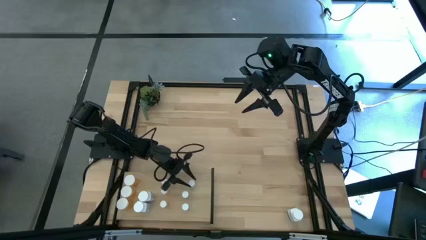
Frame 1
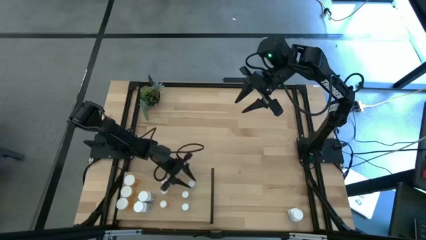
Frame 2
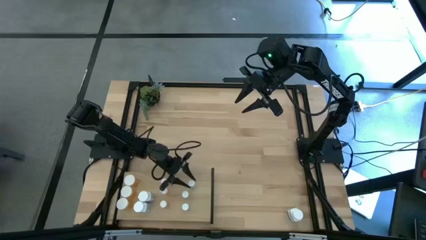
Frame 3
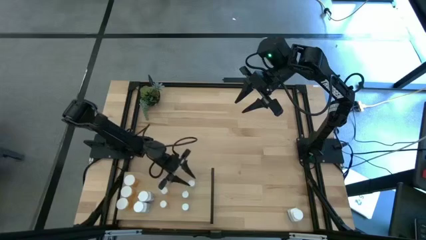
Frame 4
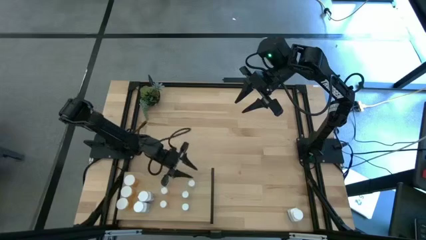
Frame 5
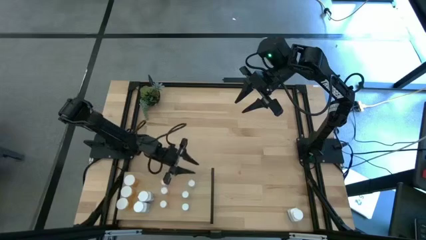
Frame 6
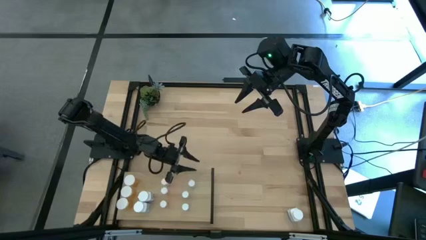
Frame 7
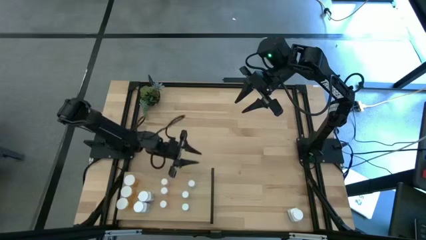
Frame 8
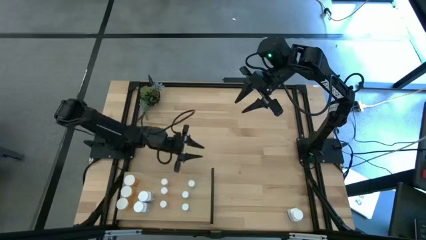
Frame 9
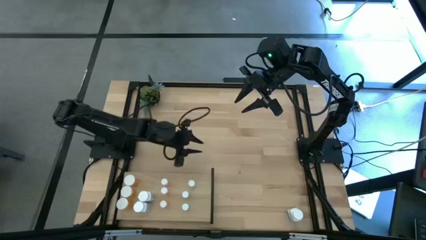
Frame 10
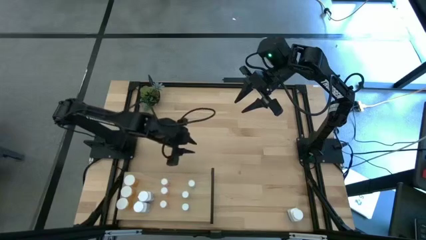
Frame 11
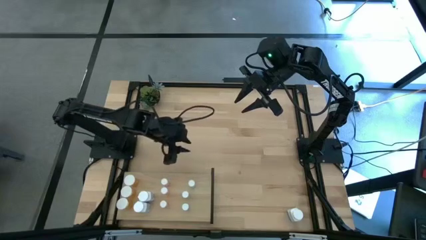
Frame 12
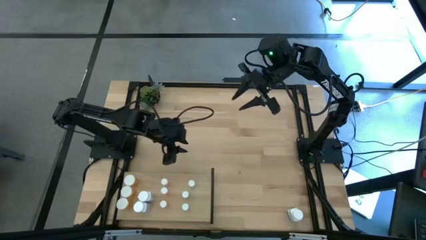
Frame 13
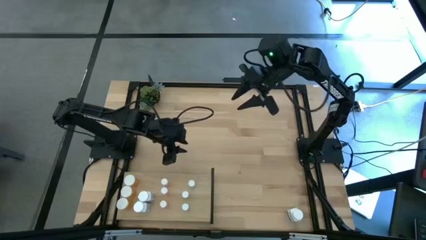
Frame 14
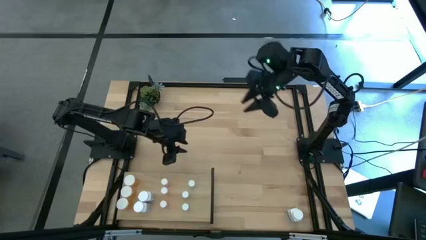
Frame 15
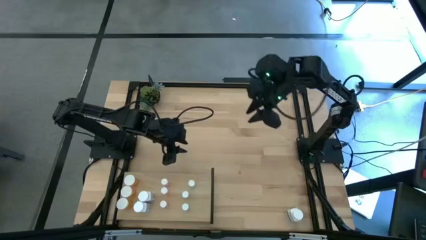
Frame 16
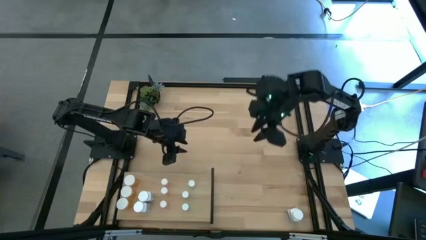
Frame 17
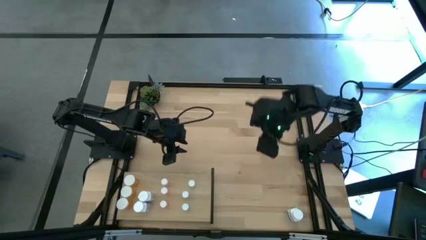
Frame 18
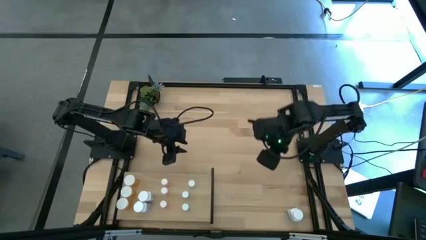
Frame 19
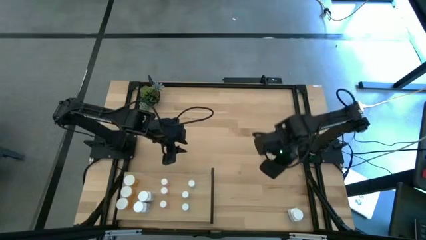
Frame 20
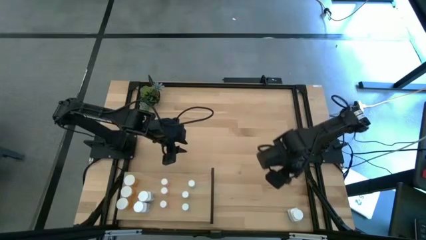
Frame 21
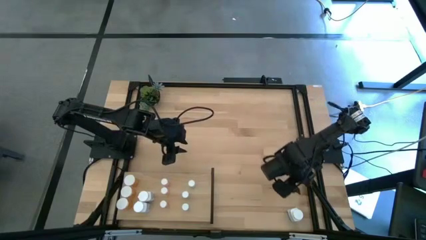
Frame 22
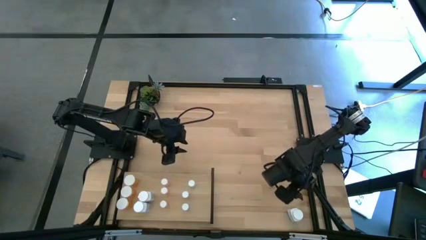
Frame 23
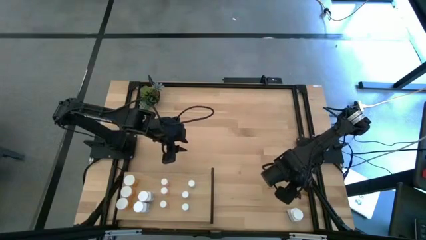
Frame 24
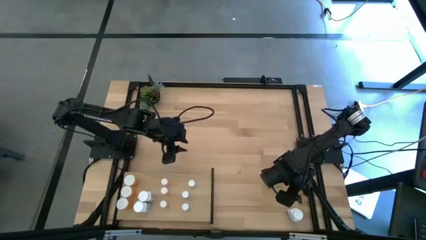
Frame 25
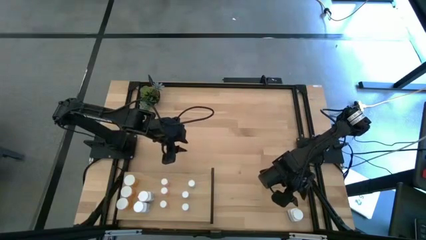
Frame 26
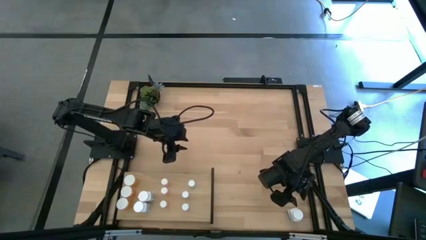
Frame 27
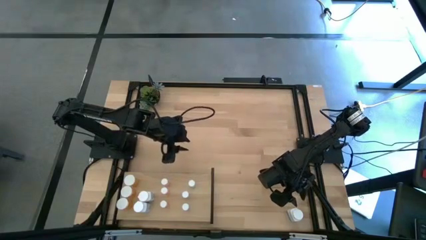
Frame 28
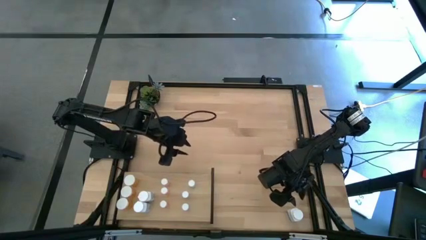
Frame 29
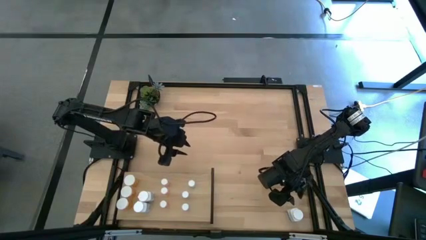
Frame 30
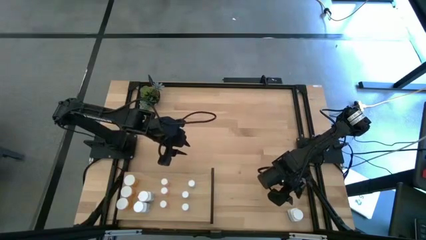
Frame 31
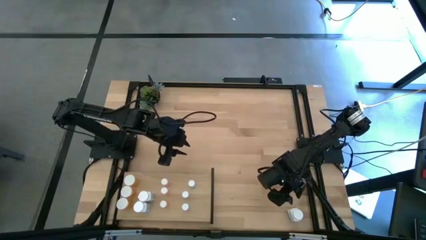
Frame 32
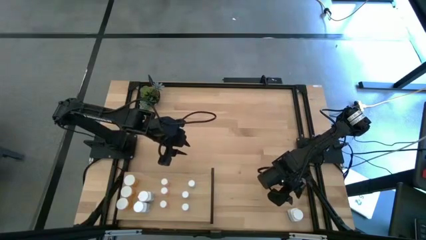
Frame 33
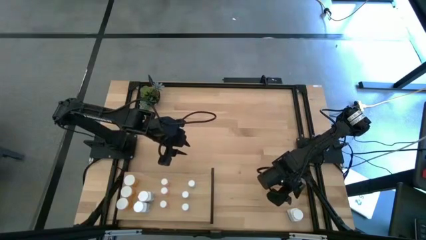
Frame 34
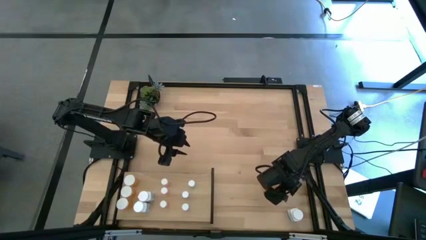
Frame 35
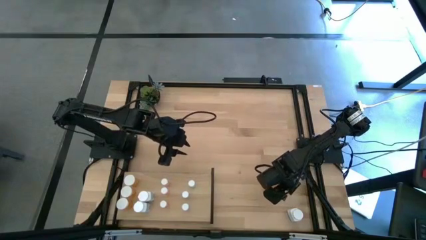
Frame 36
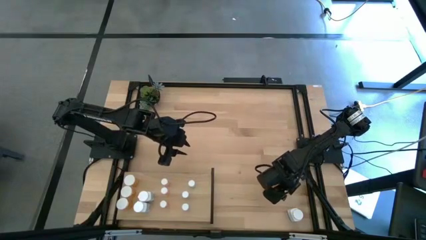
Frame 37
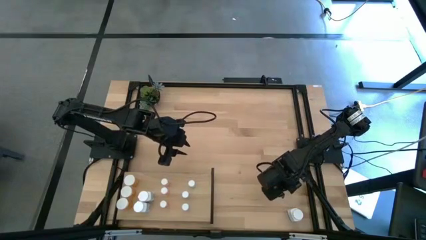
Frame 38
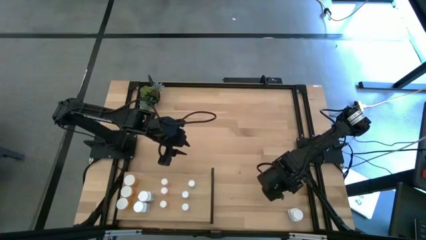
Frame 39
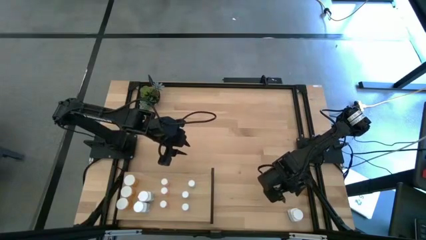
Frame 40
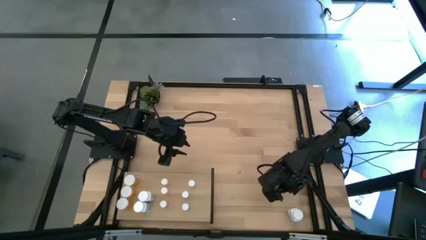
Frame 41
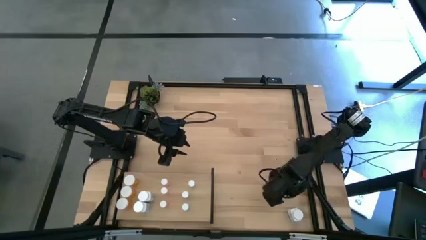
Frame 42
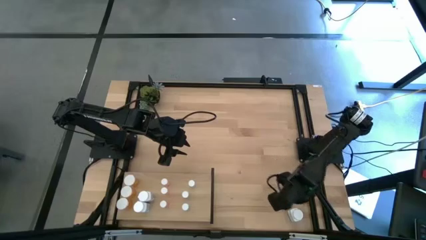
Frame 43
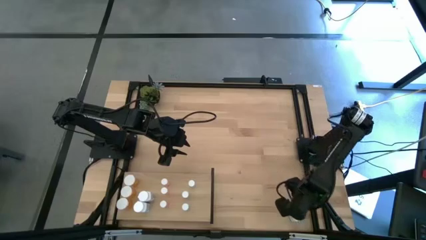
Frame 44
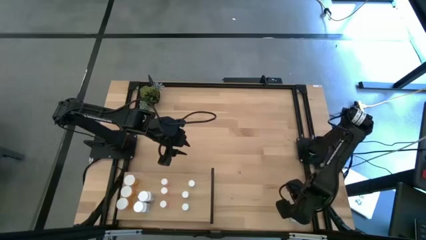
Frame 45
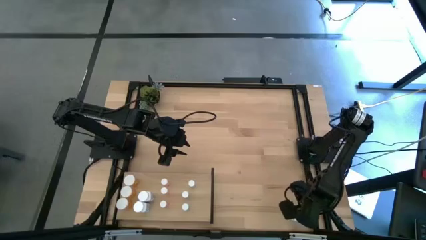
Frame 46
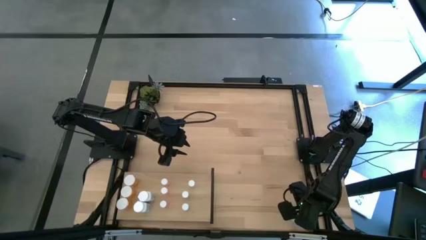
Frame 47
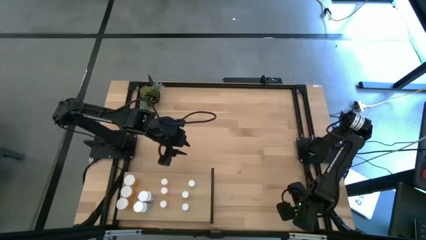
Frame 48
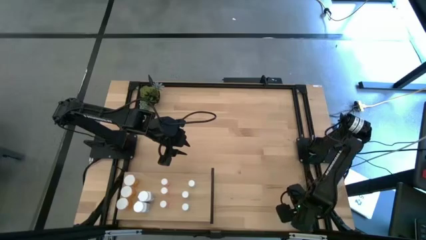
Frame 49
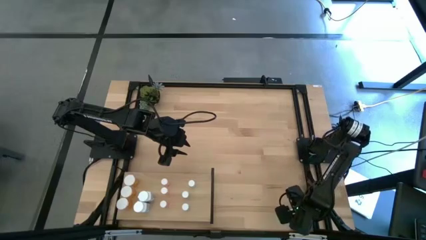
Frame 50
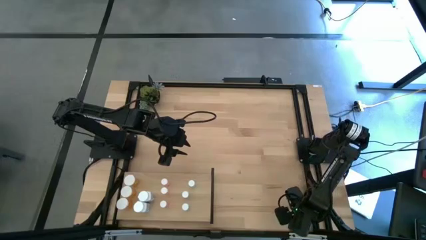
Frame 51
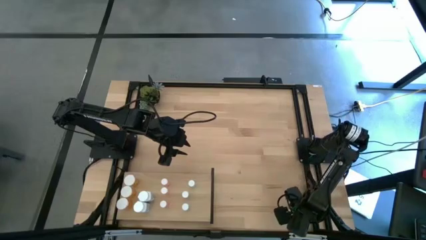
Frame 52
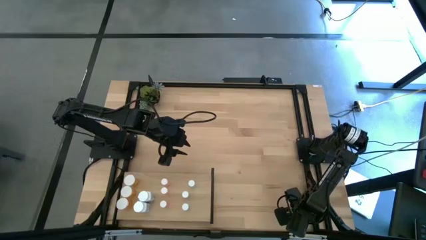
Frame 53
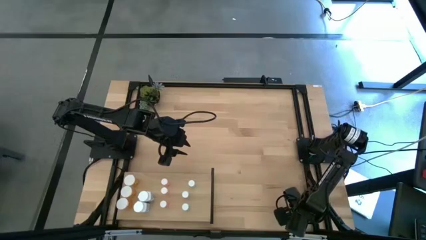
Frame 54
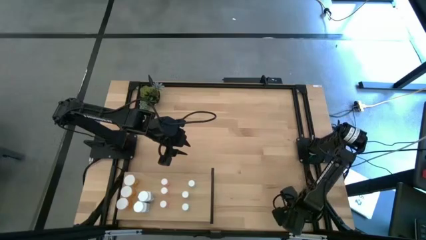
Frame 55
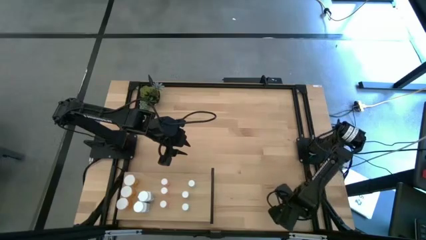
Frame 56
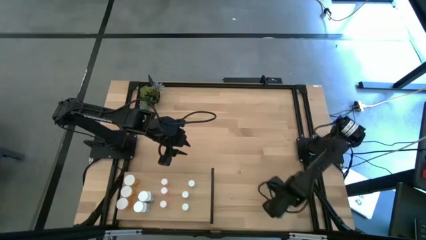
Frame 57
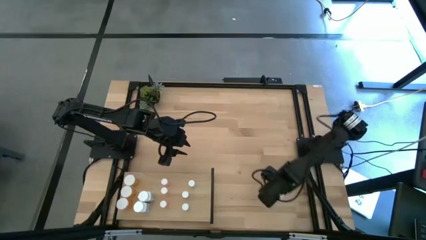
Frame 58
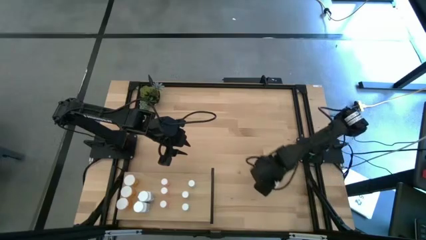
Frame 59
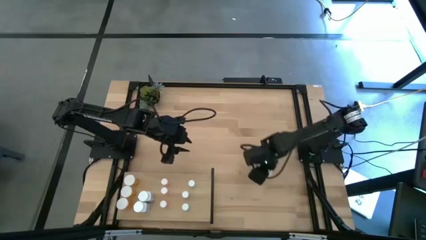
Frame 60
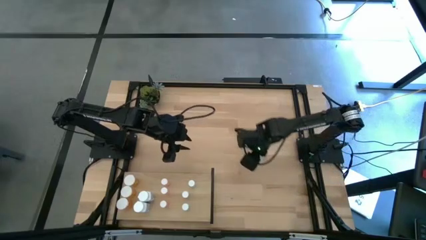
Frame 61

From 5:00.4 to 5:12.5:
Task: Pick and place medicine bottles onto shelf by color
Put the big white pill bottle on the shelf aligned with the other big white pill bottles
